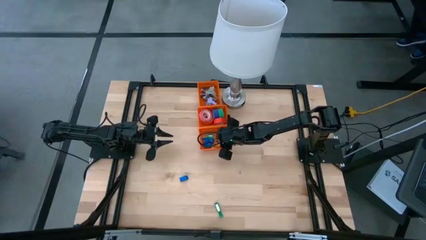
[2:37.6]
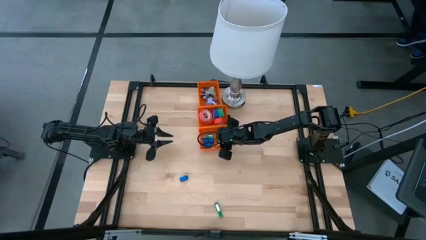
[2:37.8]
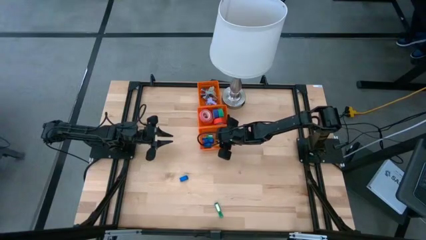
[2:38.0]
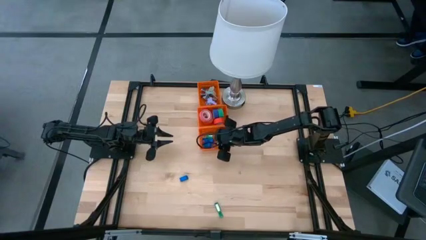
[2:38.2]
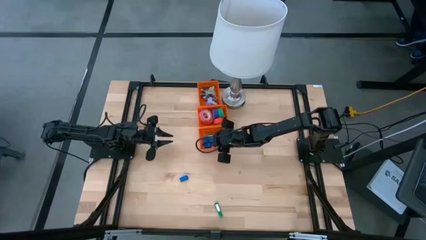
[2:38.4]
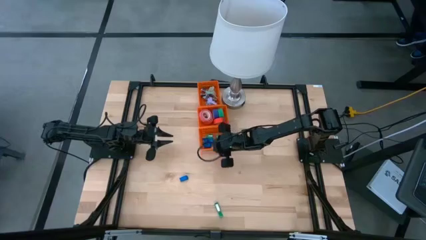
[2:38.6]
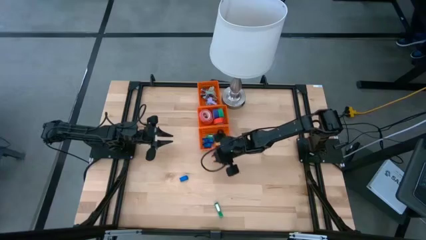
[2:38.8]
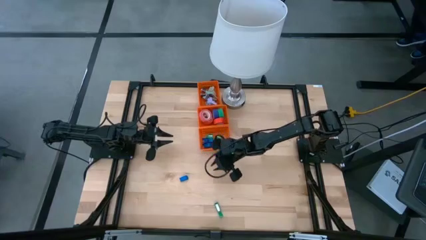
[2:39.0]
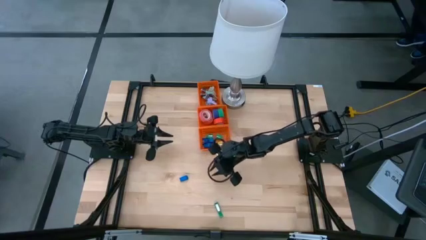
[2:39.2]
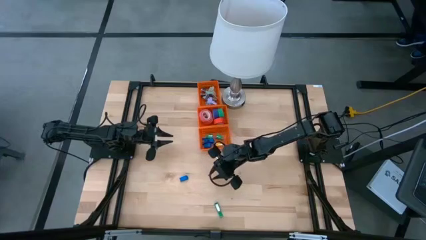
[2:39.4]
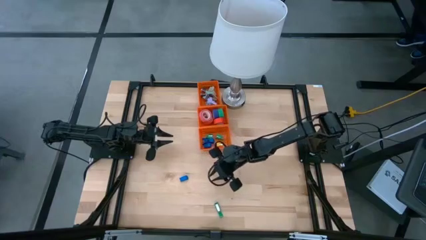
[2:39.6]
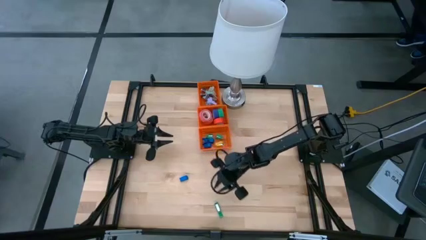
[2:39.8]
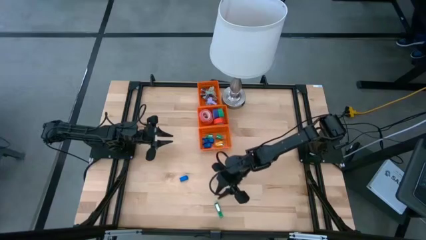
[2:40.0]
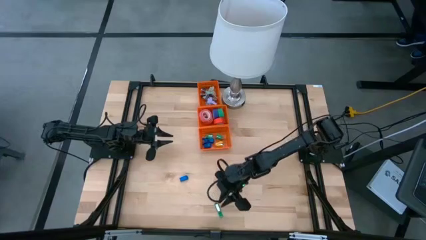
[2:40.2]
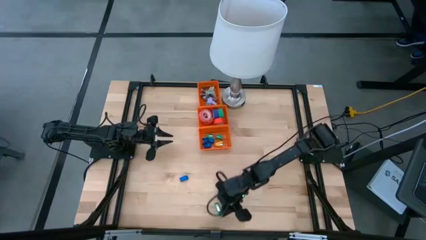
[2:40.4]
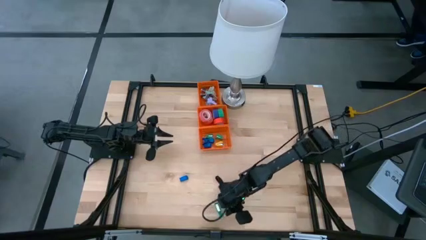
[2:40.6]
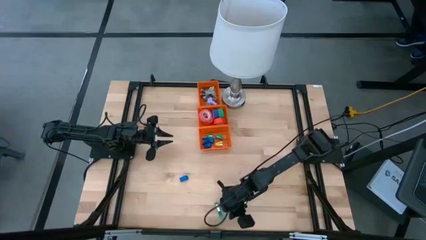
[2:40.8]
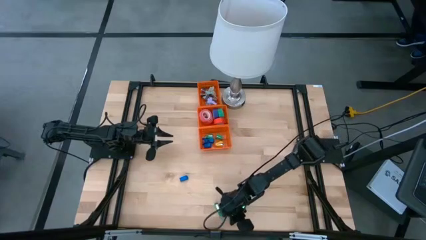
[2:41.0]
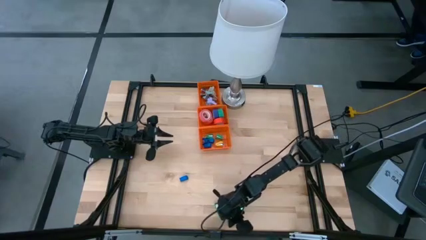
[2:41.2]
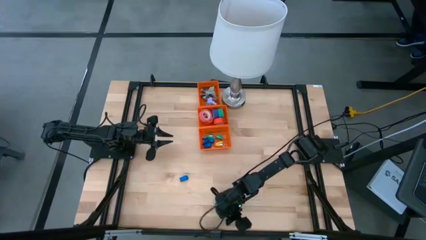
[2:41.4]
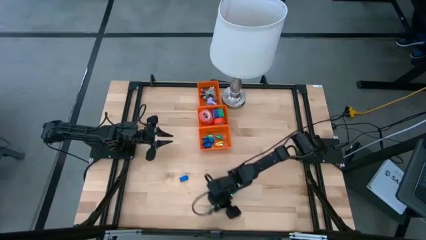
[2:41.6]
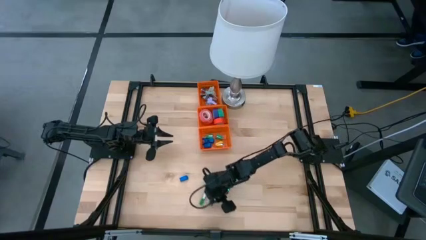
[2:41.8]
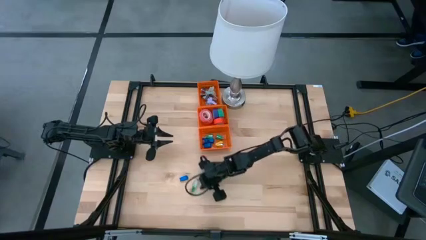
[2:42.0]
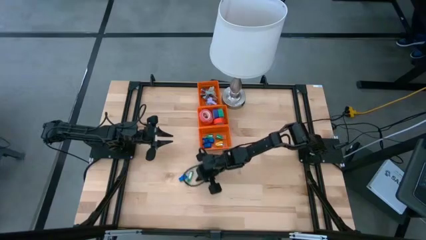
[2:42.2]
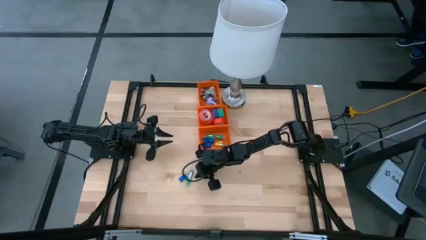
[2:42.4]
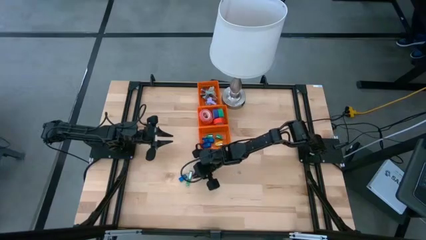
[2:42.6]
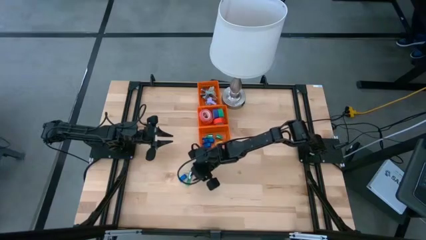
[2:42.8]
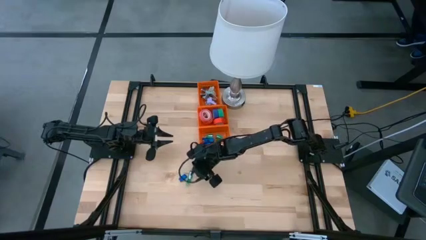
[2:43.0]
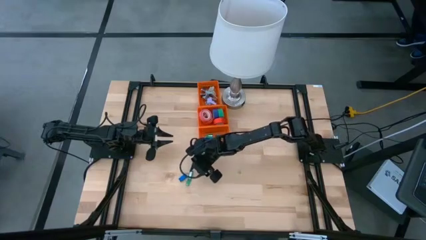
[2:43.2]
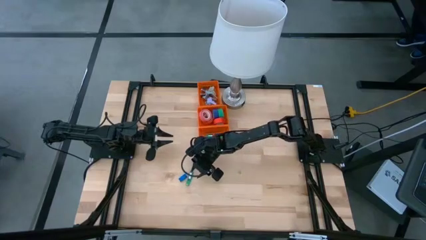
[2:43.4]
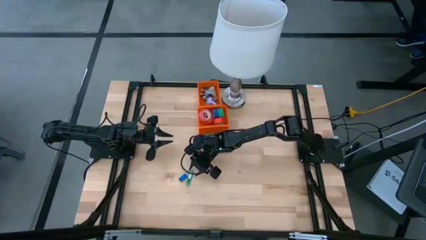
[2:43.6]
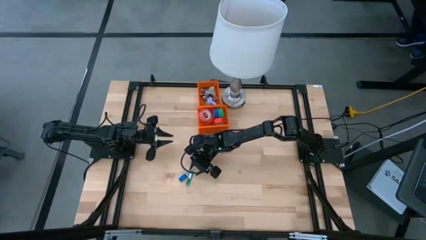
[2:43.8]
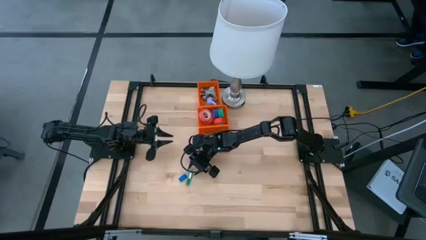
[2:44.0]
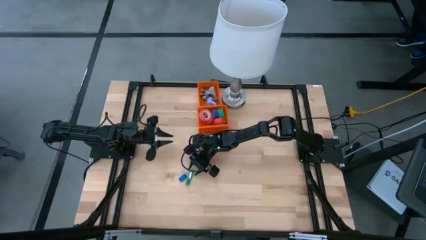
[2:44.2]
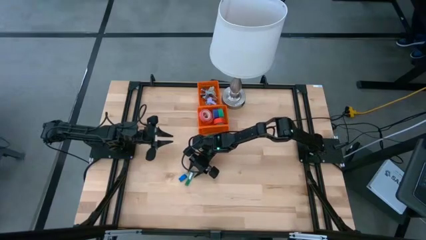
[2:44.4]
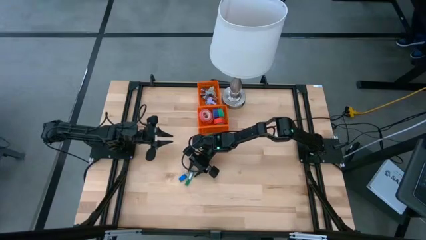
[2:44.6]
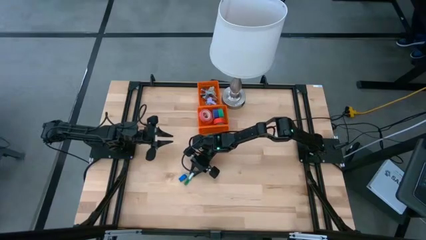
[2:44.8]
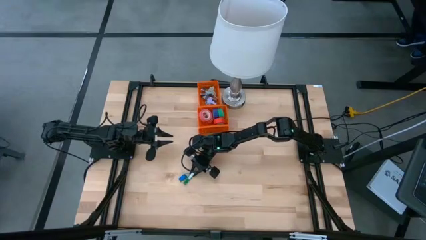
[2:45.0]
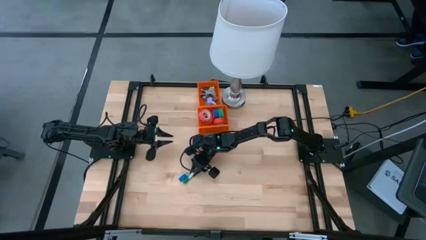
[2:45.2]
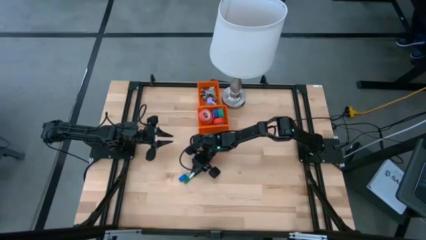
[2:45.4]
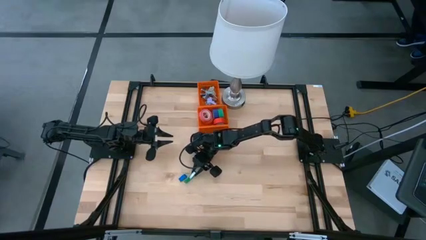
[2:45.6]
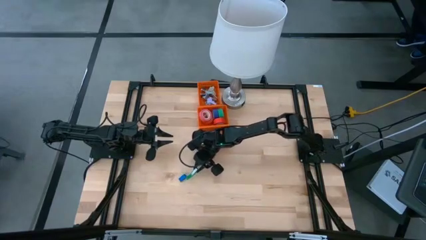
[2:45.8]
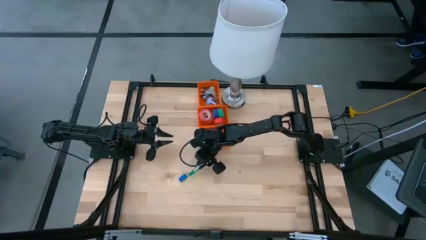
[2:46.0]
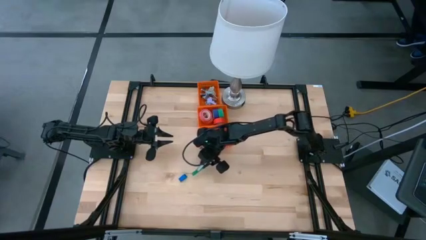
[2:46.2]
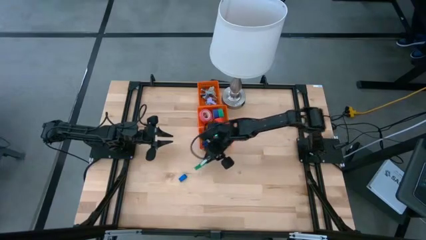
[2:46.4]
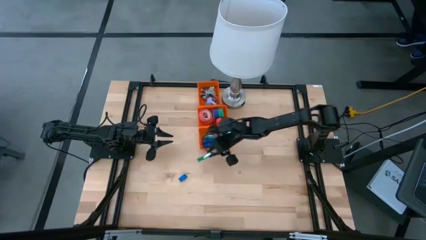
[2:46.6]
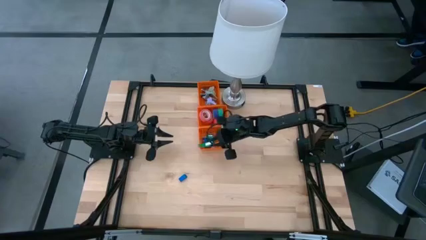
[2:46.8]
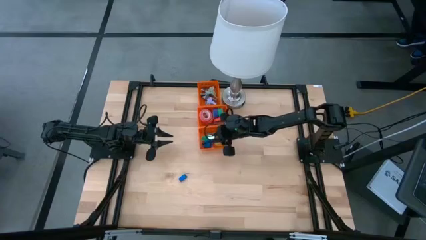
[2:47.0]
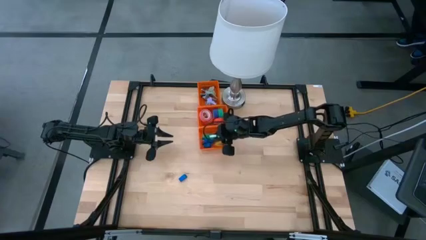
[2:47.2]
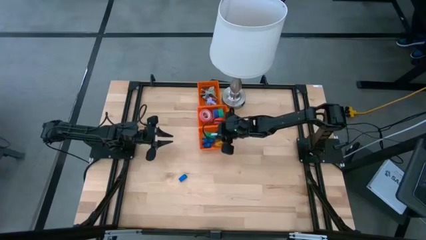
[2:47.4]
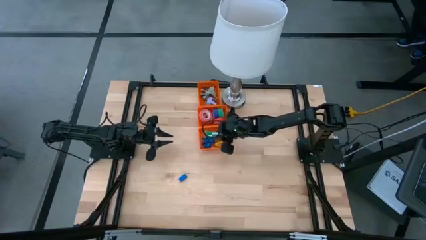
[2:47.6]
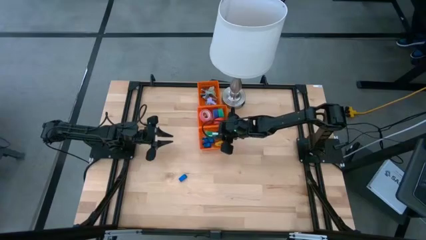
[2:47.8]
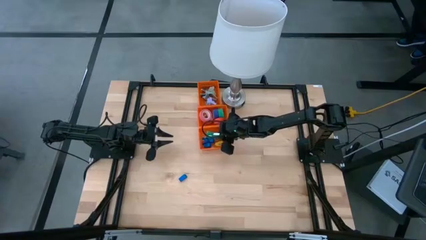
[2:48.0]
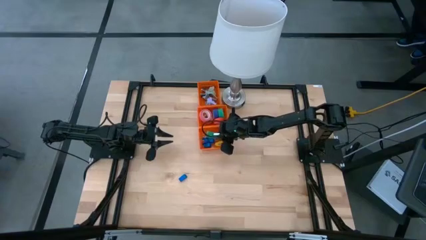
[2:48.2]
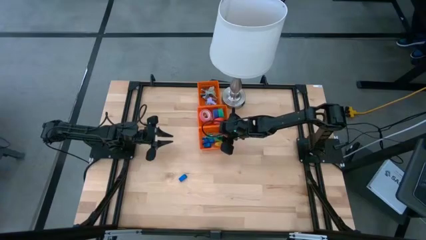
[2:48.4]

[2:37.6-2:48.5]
Task: Pick and place Stapler, Stapler remover, tape
Put the green stapler into the bottom orange basket

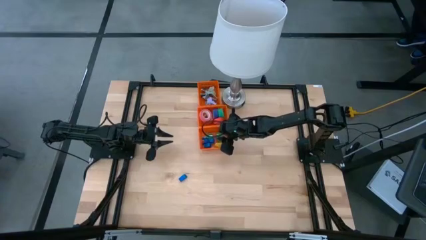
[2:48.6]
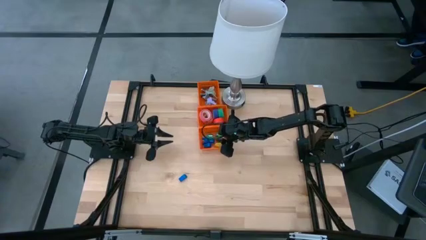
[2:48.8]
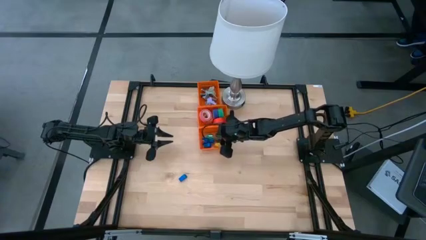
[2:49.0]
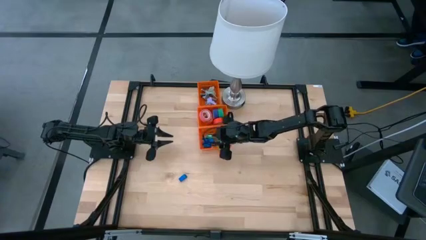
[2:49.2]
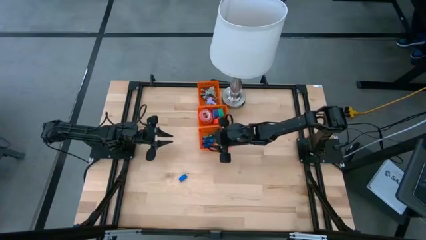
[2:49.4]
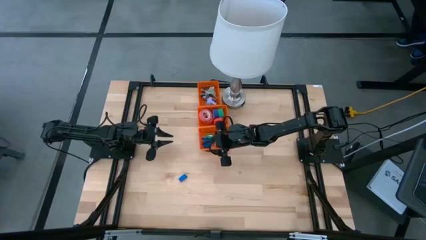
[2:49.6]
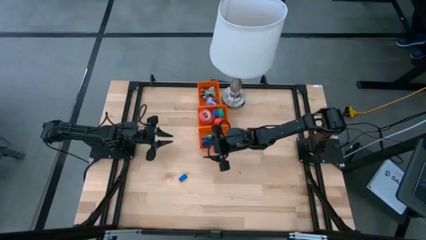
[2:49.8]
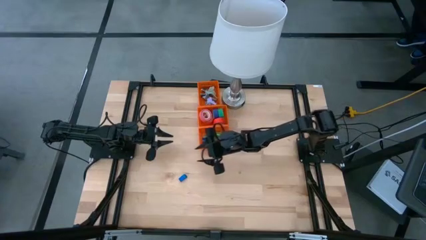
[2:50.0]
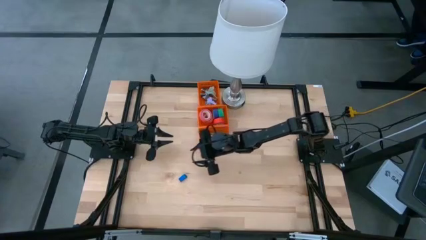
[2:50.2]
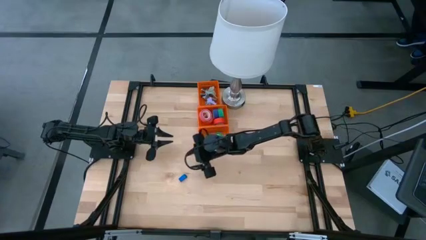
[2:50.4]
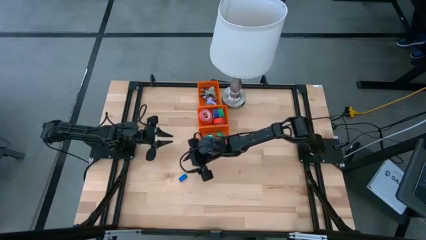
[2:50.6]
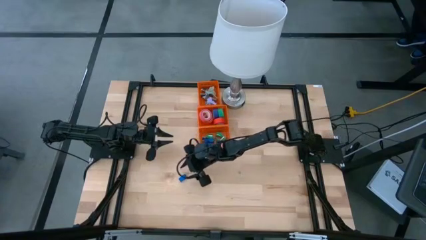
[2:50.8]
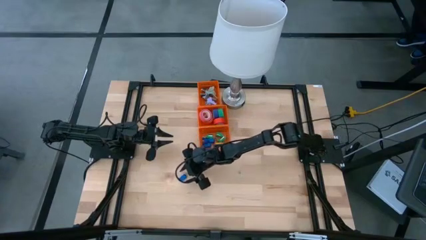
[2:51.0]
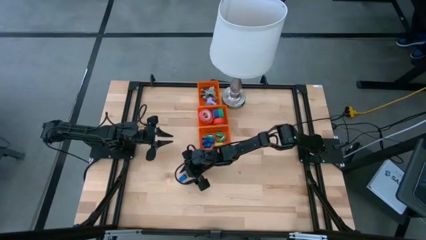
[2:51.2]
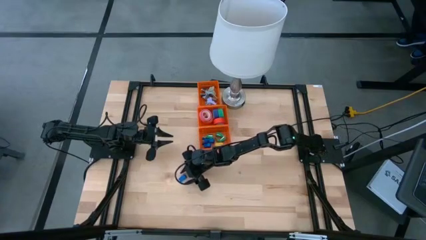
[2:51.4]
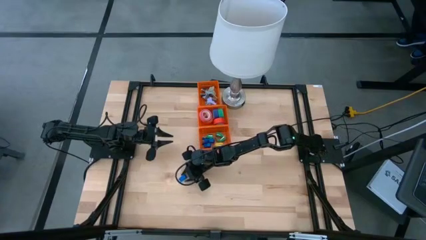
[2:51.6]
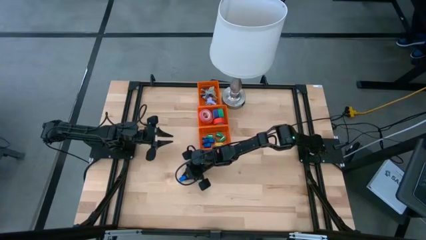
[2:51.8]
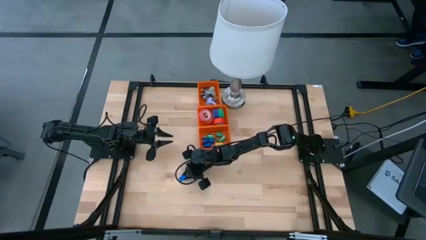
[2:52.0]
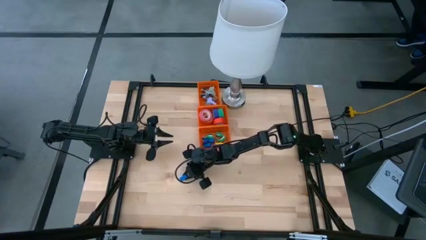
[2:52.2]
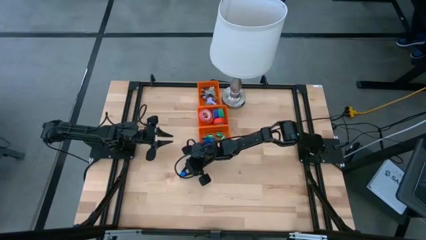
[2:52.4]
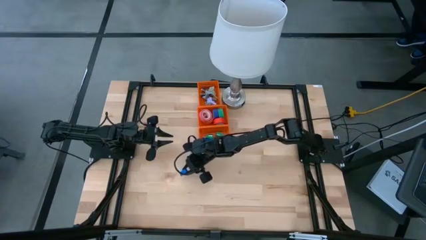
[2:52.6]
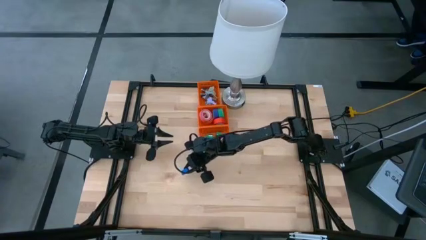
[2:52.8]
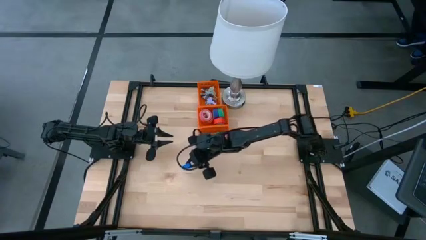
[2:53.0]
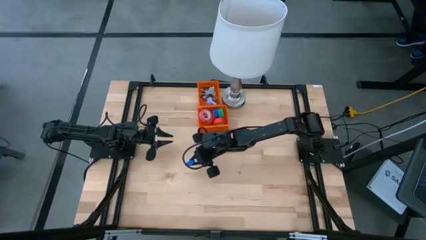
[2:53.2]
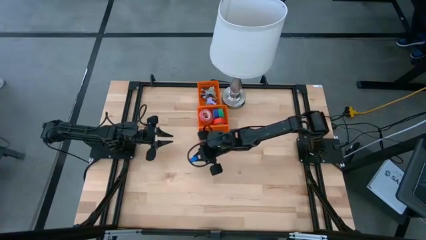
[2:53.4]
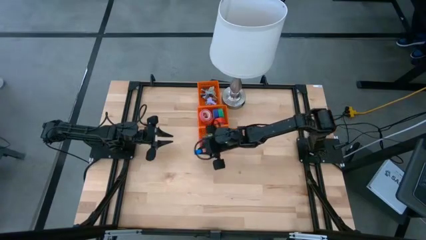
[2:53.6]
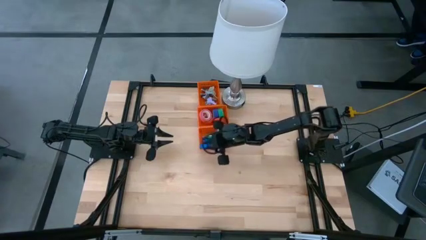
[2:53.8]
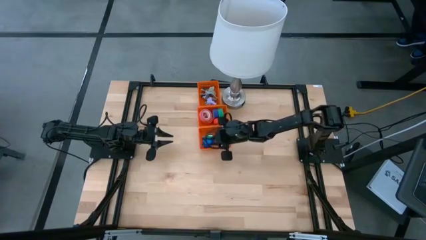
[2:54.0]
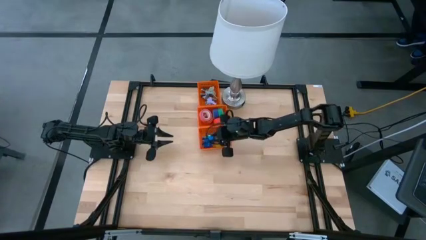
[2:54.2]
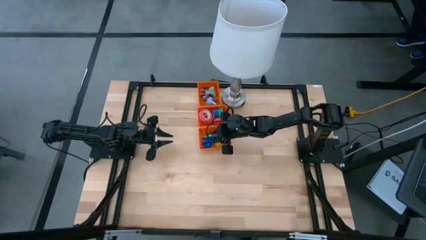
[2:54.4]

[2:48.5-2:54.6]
Put the blue stapler into the bottom orange basket
